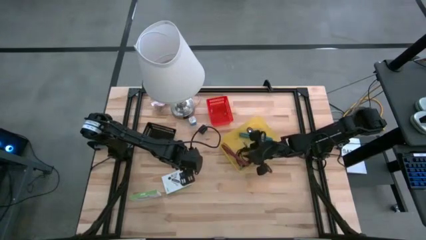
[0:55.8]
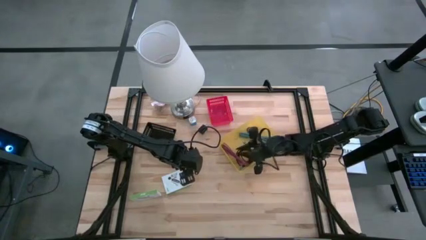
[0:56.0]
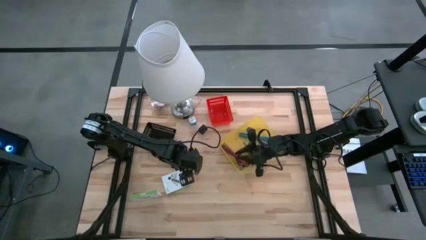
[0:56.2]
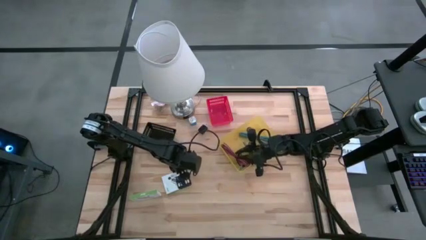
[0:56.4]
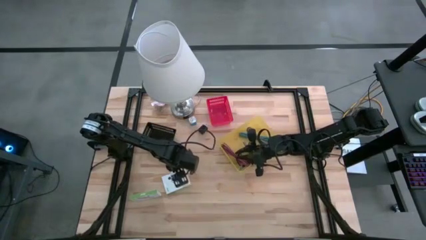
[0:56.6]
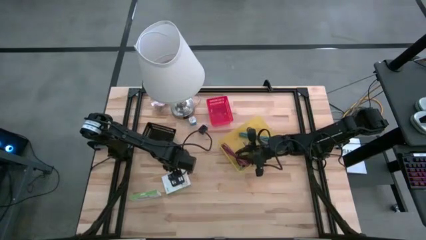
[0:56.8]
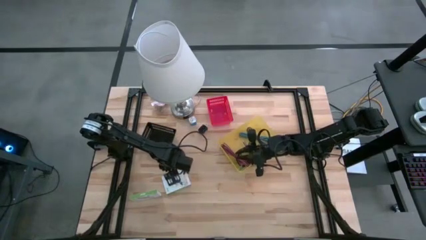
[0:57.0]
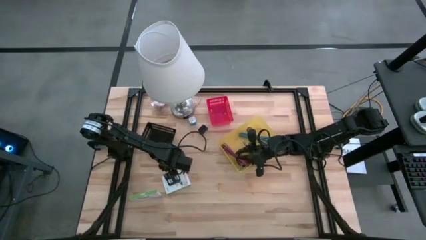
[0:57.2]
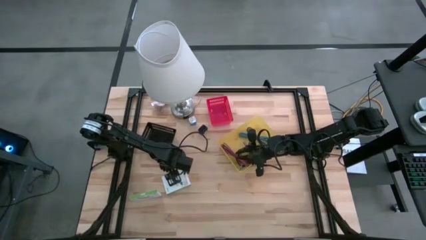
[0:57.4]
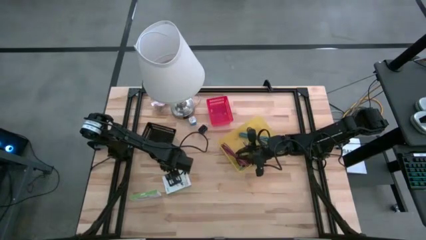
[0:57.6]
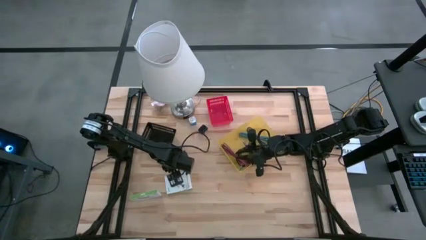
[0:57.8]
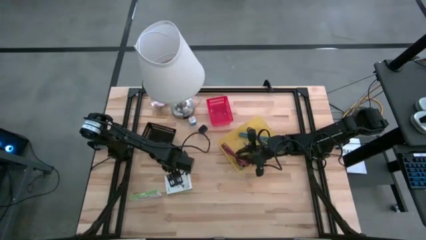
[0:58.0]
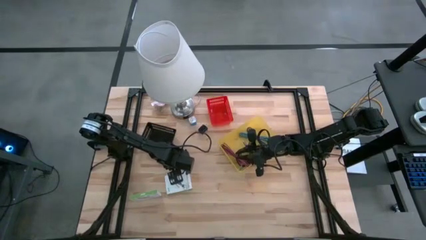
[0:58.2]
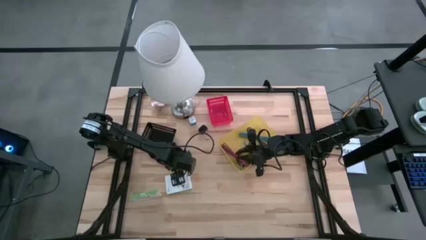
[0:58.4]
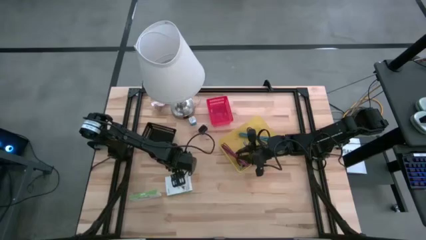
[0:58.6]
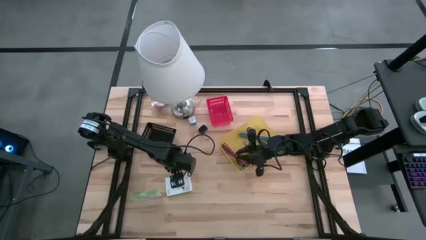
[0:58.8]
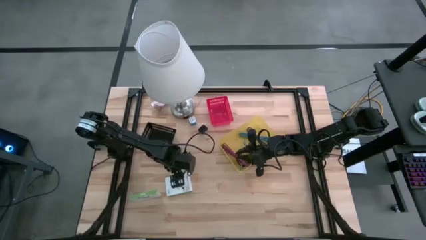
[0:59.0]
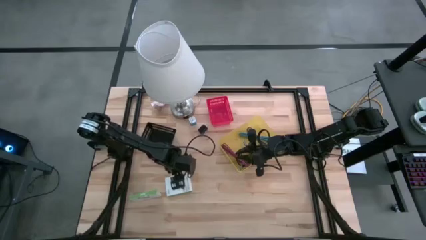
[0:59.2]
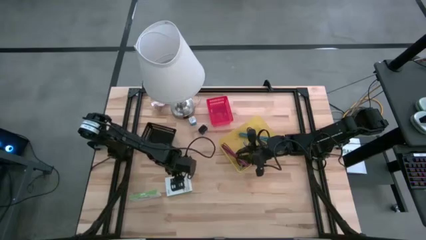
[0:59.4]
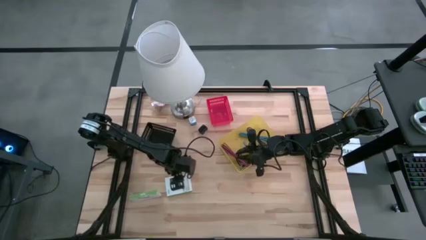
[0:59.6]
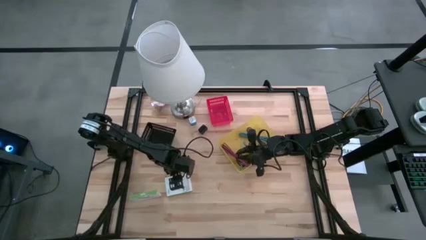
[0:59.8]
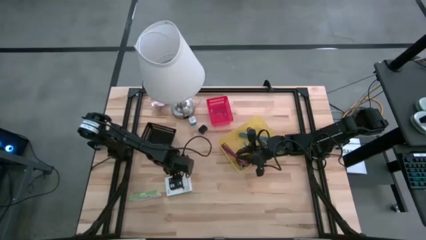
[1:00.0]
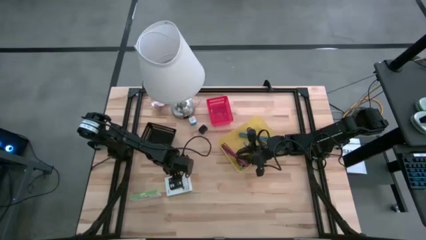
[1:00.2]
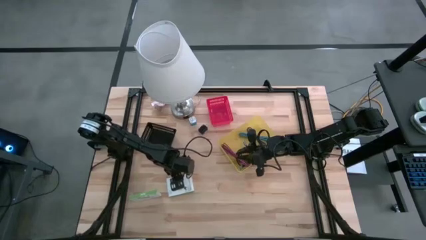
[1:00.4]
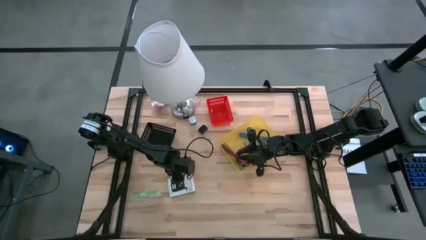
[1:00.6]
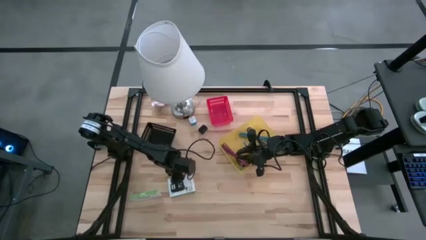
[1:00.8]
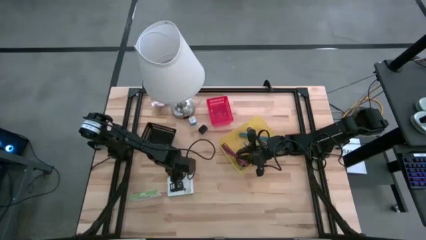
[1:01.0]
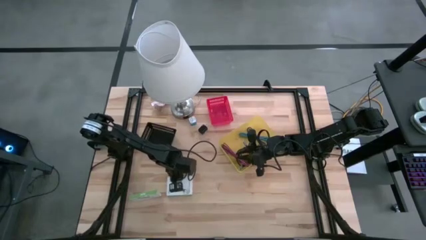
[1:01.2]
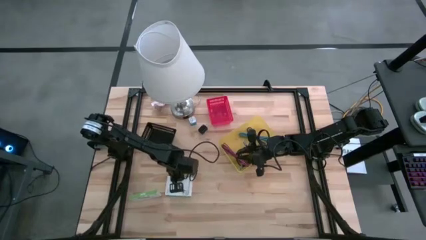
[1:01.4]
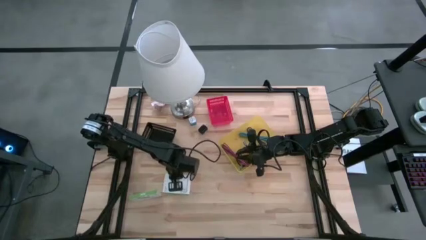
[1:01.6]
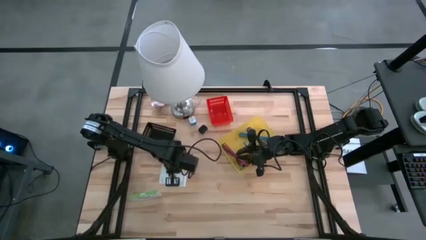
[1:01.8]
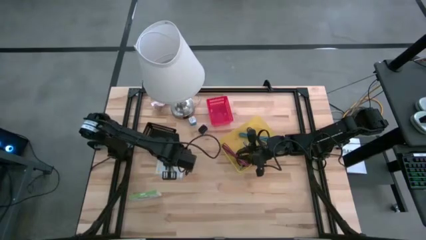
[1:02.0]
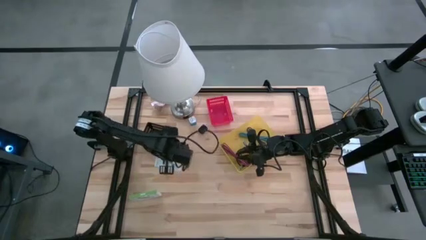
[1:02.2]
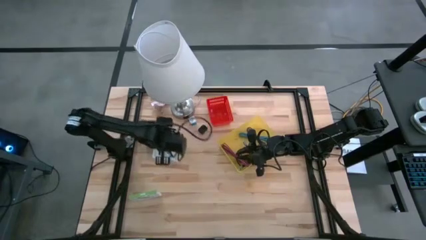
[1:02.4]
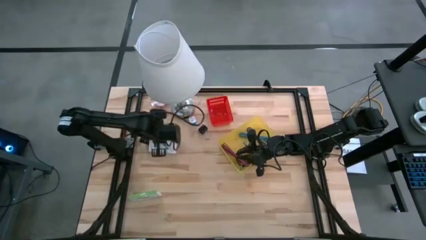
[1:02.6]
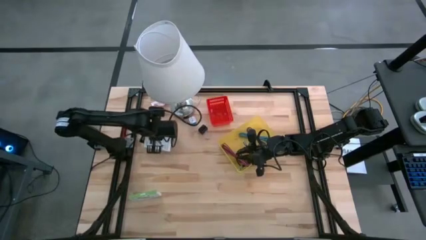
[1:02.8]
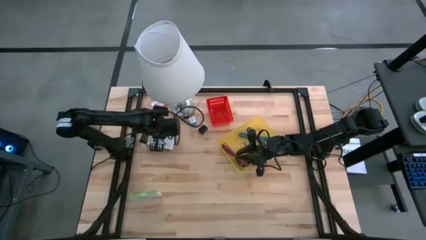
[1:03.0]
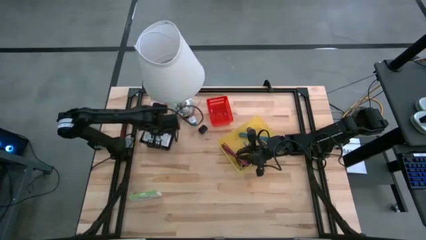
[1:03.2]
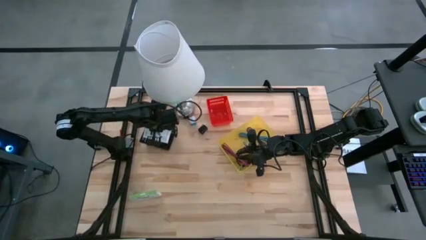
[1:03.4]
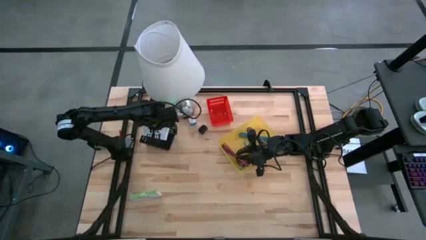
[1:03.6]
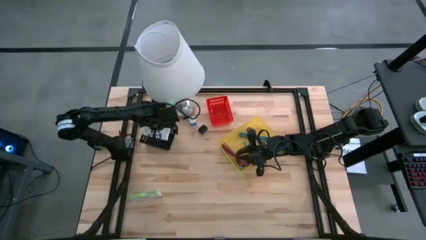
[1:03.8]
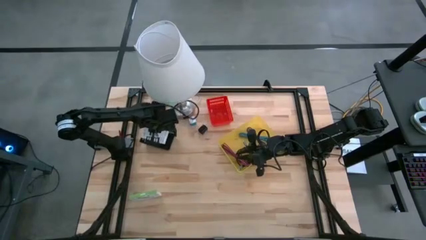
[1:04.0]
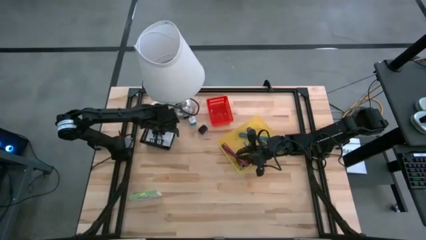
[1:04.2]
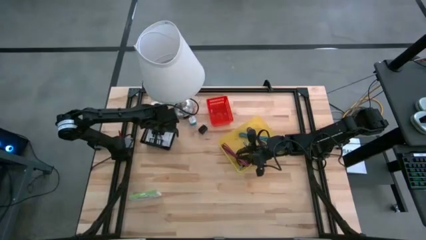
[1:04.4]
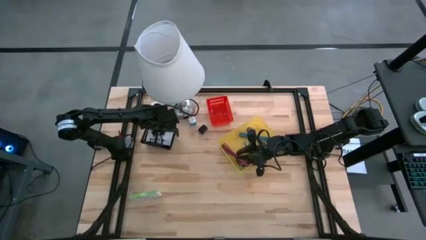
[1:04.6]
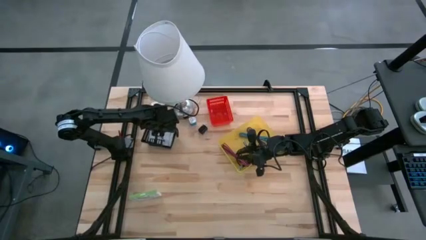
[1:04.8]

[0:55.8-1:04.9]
Task: Pick and place items into bin
Put the right card reader box into the black bin

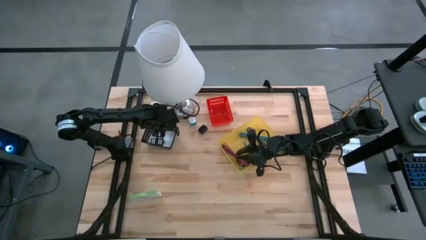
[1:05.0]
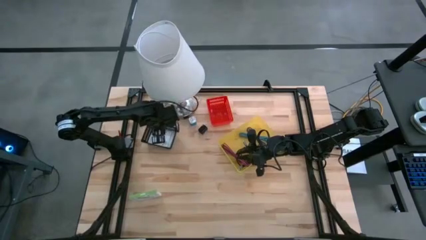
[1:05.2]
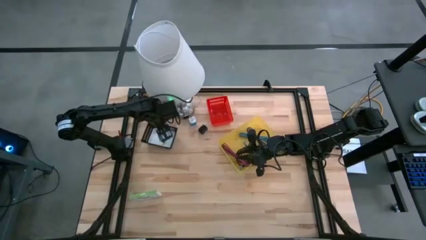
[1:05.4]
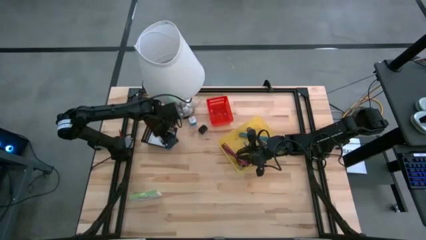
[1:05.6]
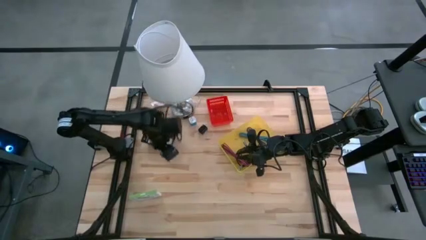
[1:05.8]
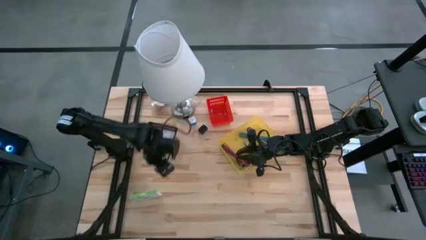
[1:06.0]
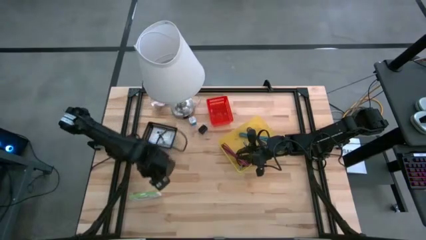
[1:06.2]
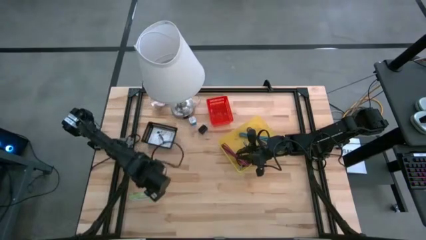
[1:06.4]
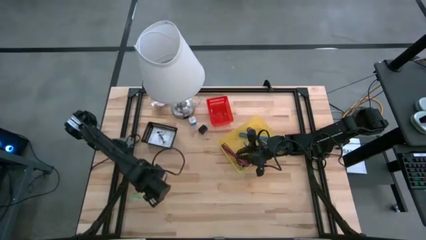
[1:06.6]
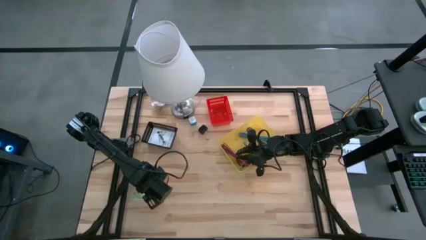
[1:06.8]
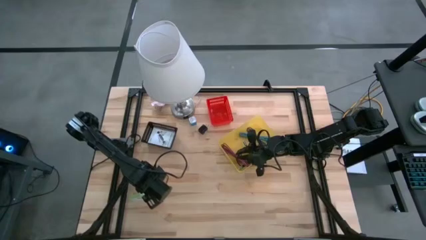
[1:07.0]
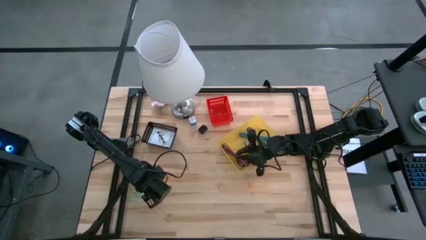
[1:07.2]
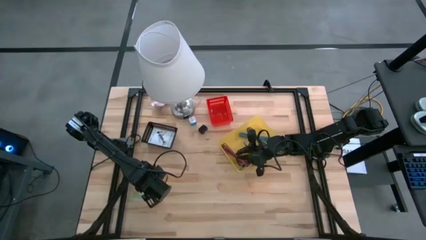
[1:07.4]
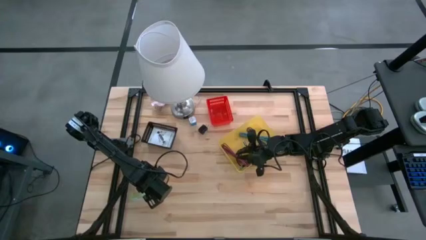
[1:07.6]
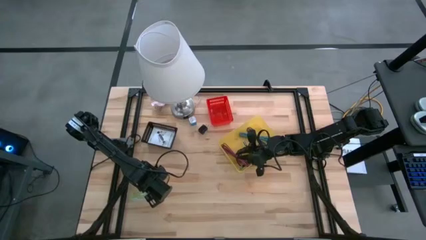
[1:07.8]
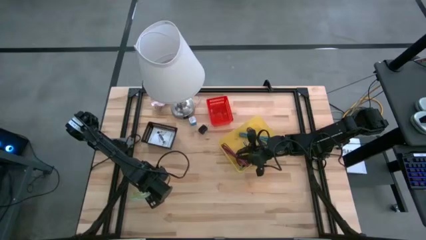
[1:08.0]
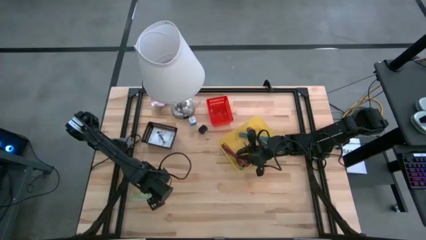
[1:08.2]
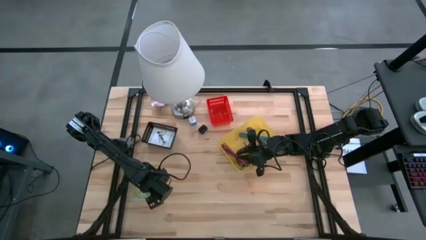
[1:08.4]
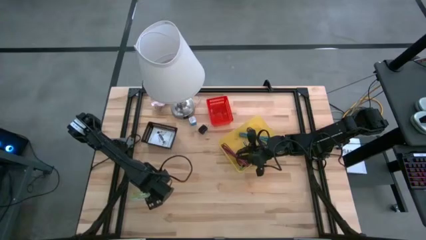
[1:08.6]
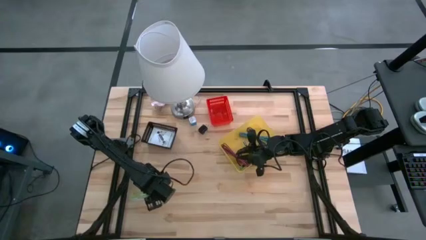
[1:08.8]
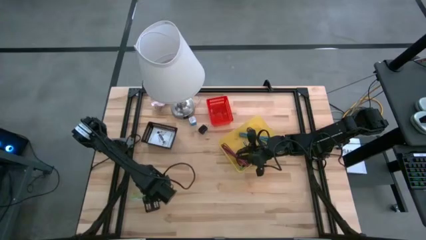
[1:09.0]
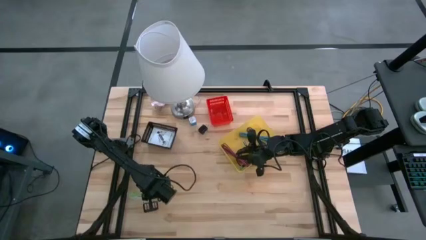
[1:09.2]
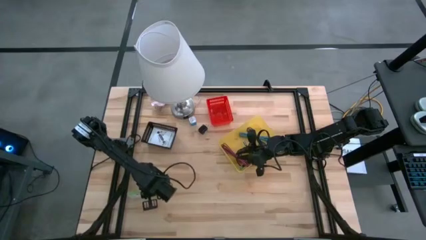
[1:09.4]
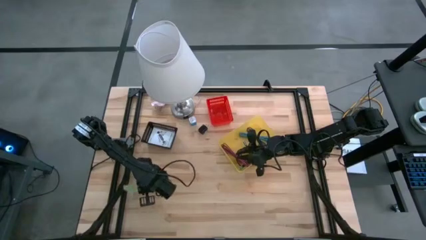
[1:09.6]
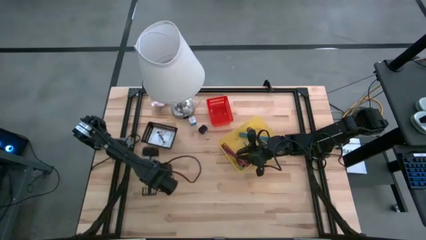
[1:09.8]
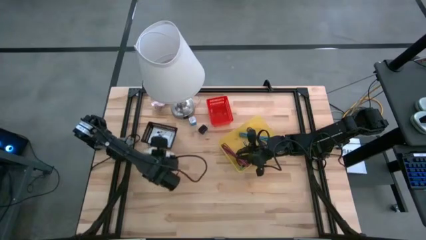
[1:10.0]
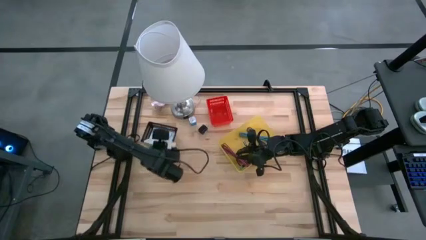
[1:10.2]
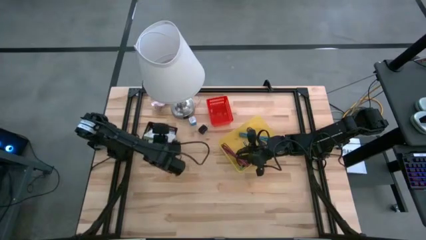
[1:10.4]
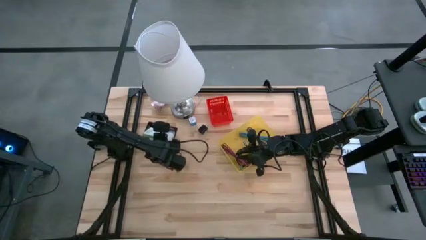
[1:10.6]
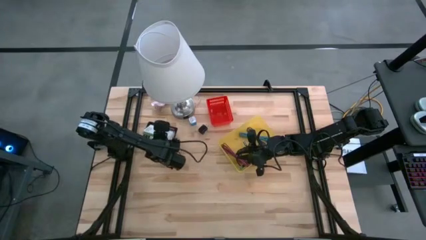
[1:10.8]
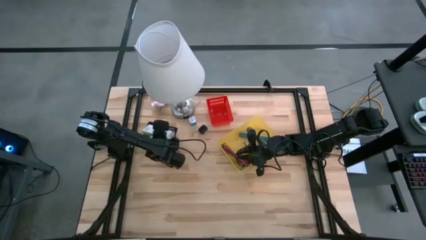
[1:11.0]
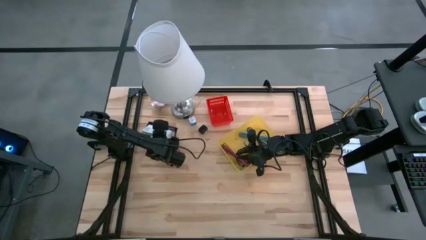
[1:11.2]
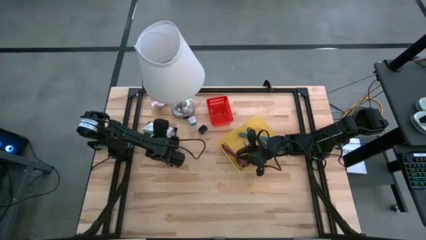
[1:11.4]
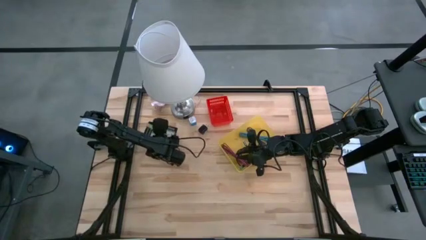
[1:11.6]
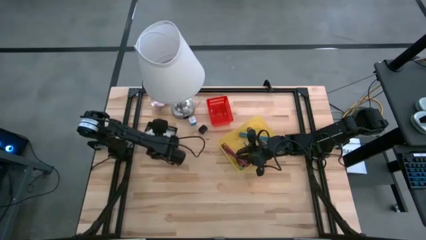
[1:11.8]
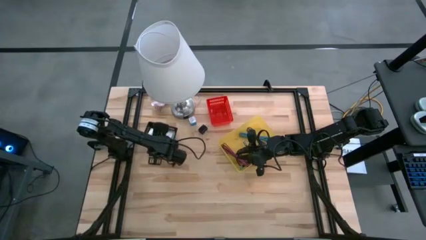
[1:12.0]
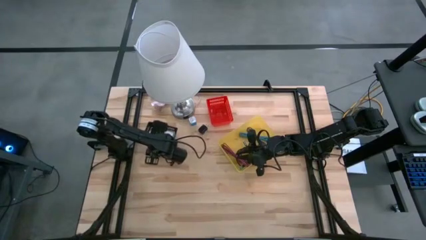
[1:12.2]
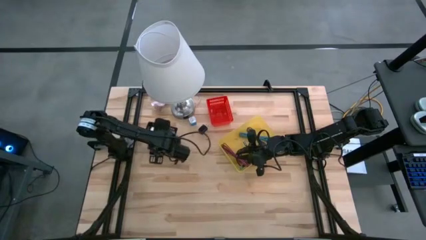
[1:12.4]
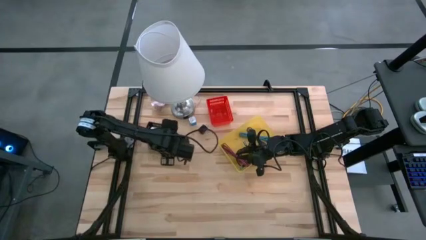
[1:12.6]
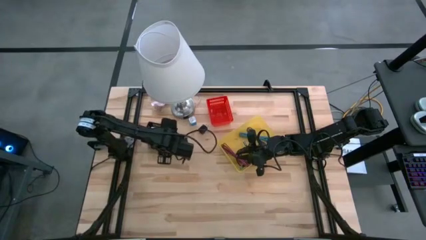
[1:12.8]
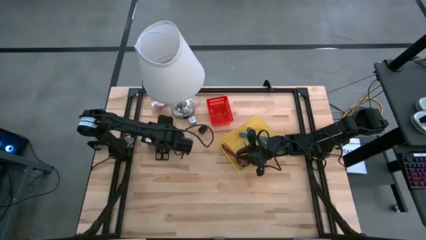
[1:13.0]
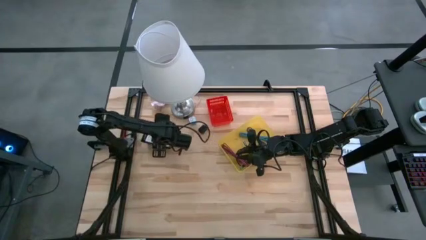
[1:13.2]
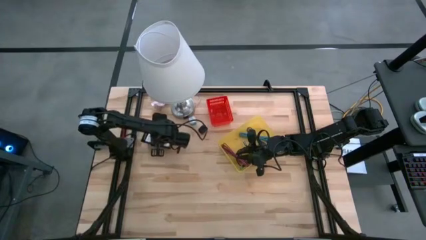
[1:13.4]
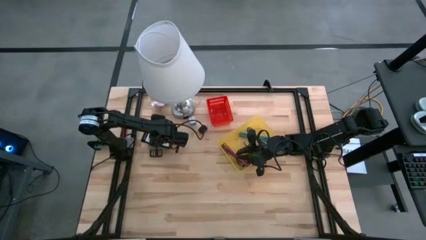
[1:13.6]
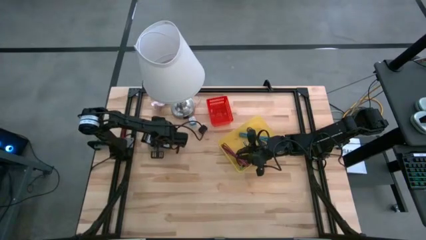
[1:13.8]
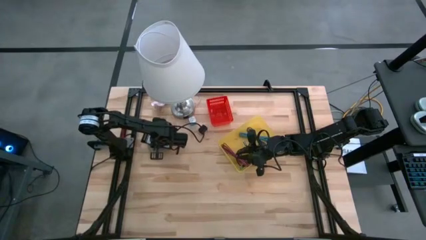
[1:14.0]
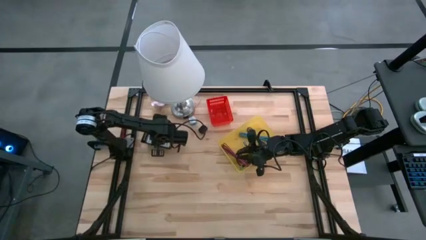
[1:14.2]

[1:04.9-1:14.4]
Put the card reader box into the black bin
